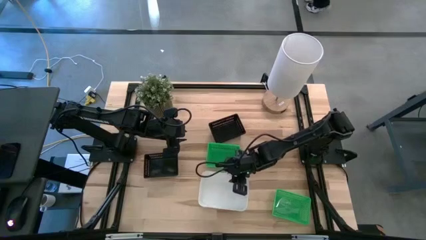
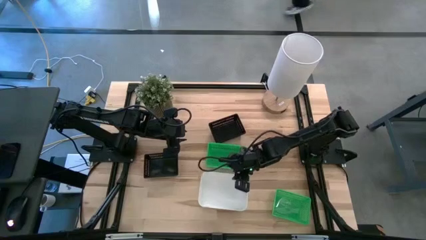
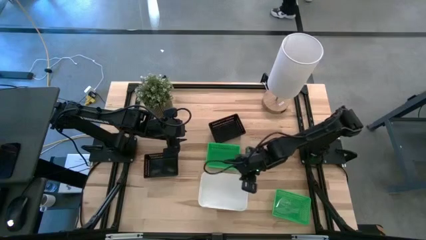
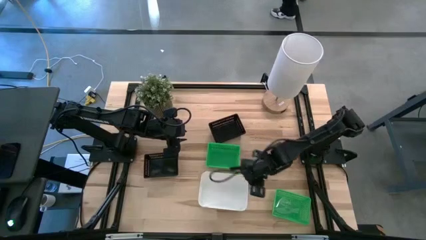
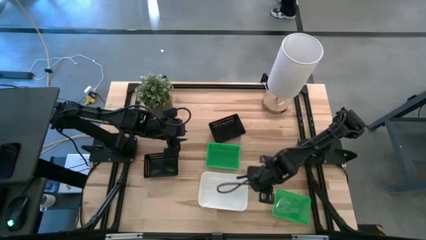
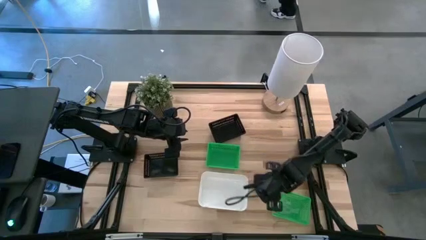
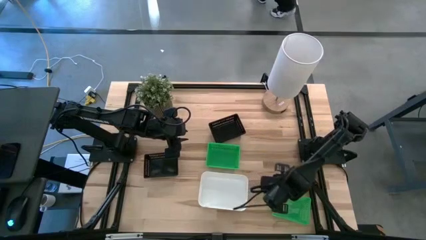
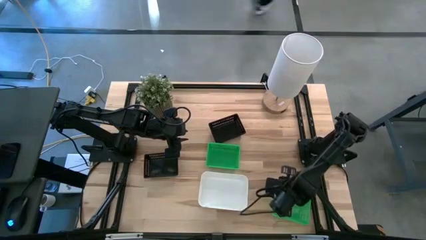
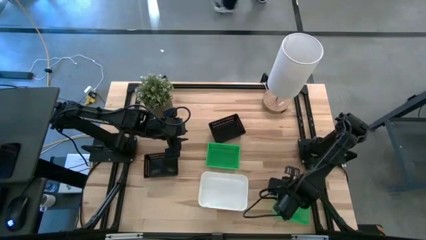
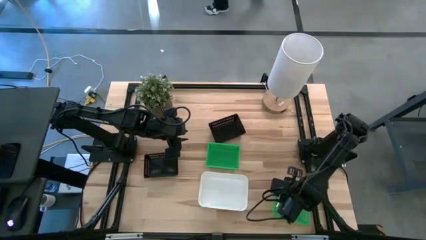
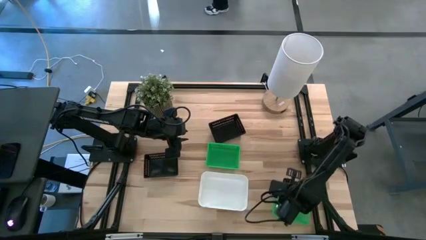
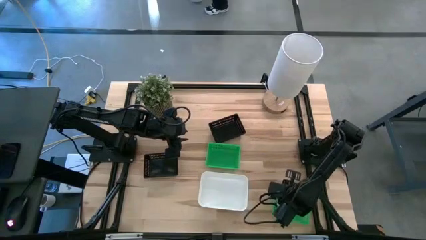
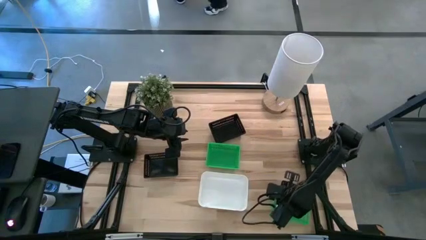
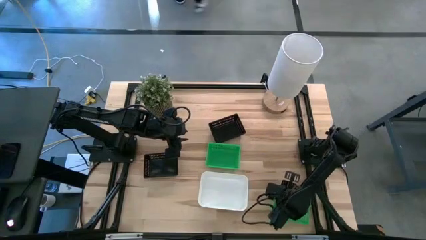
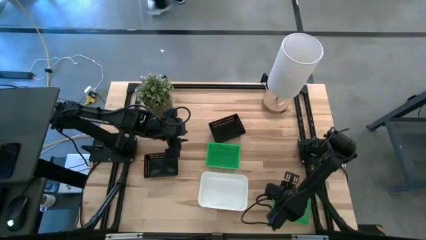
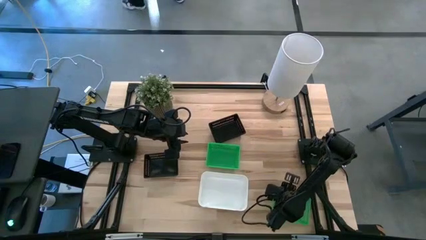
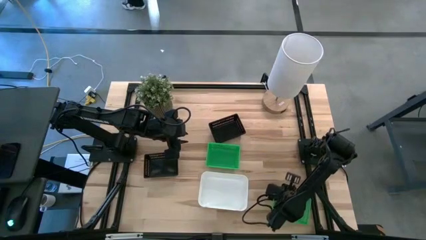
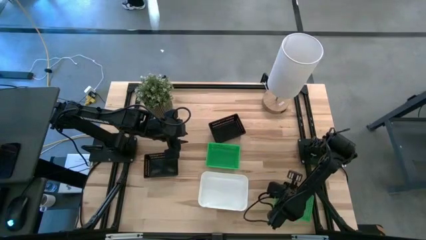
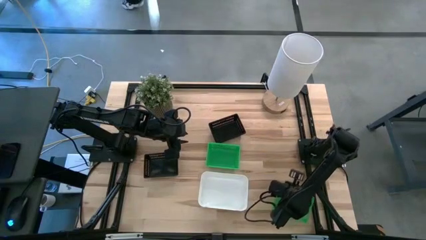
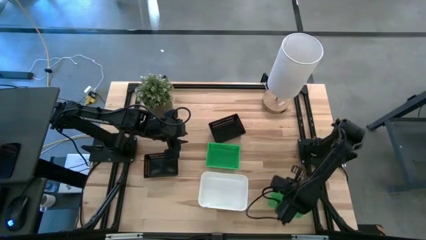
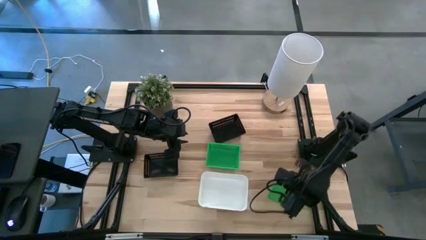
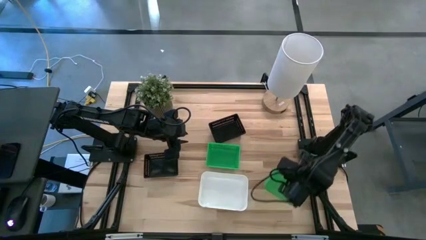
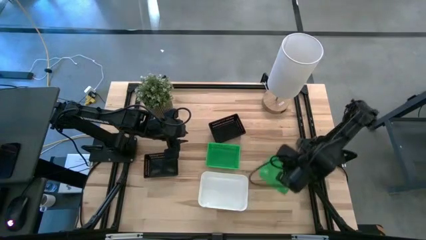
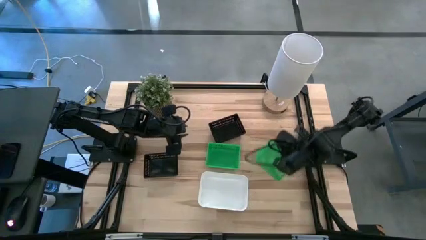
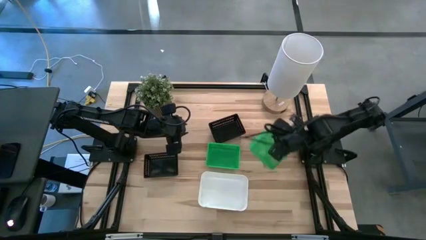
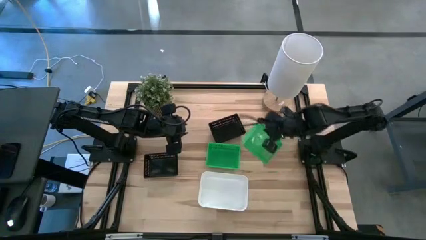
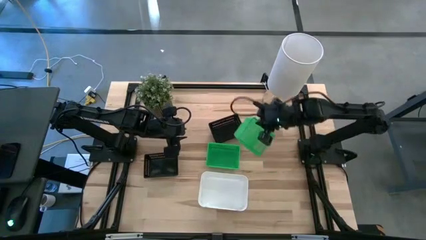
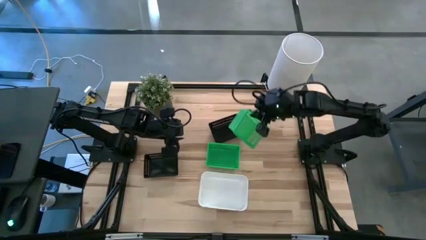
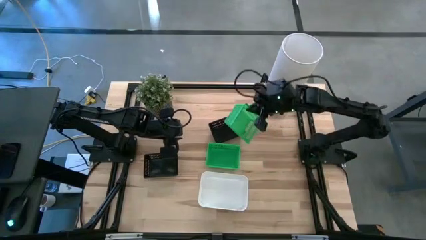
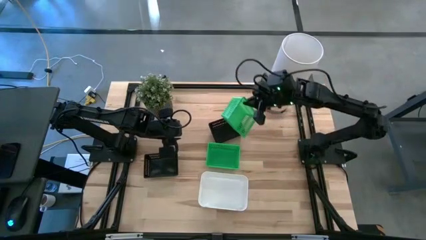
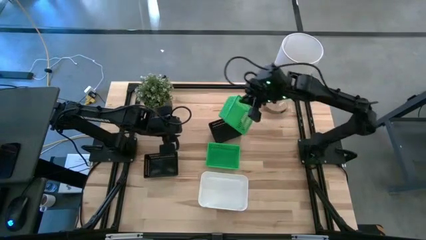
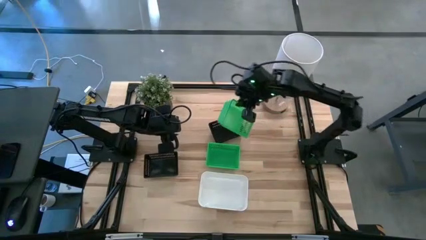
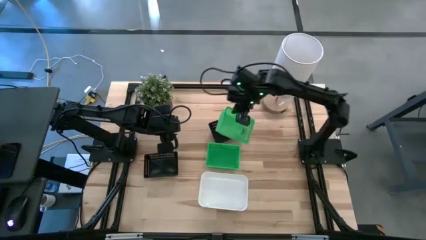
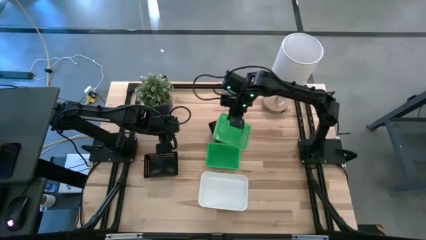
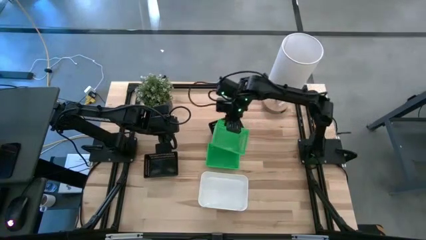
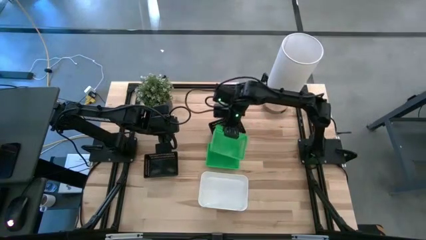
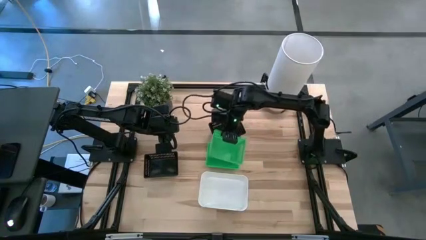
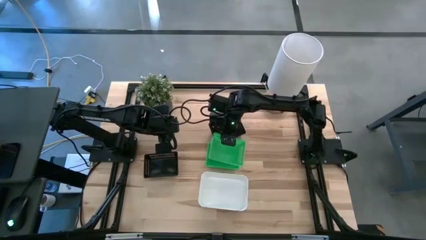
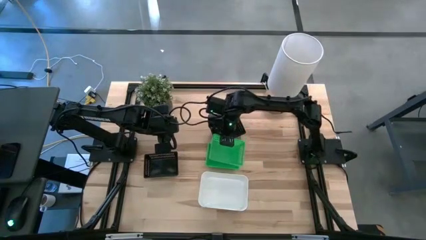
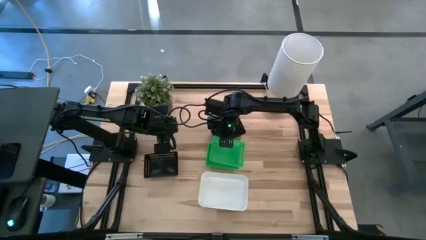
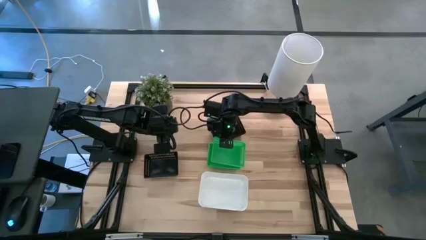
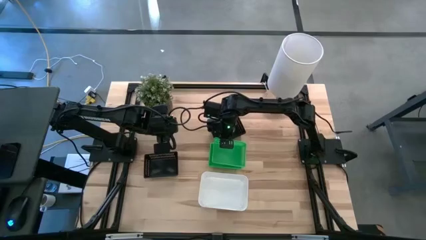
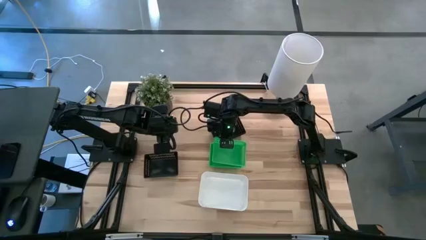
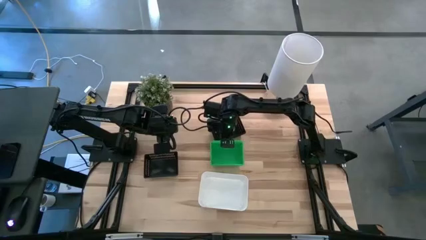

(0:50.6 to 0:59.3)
Stack the bottom green bin on the stacked green bin

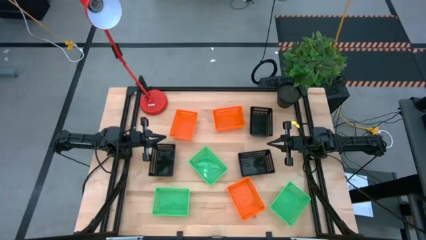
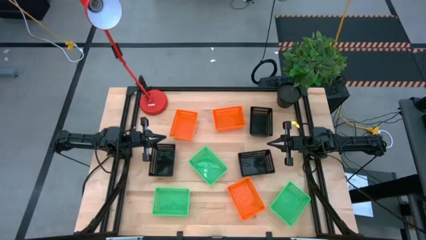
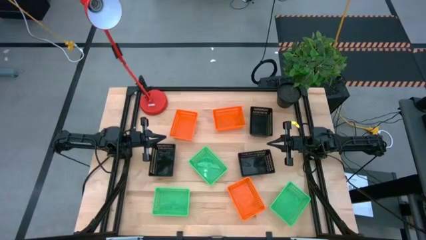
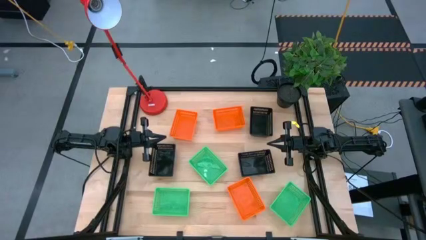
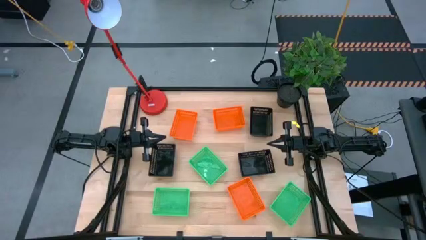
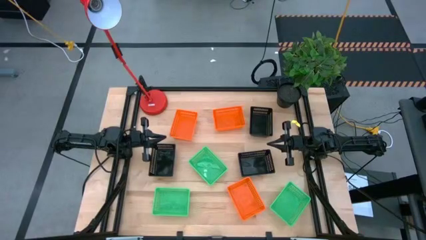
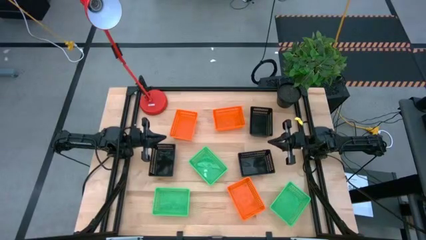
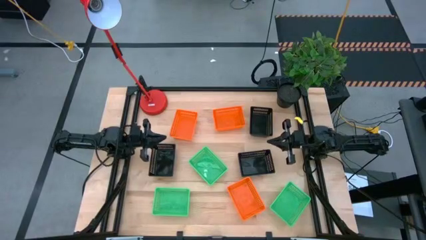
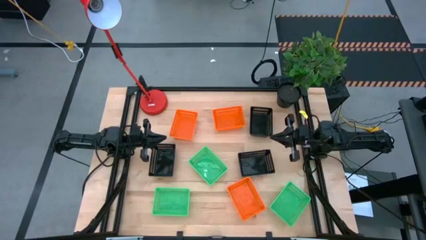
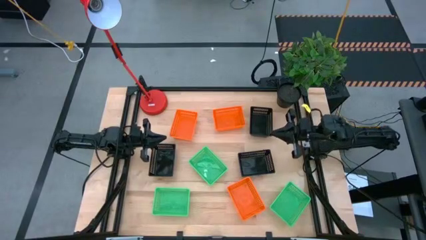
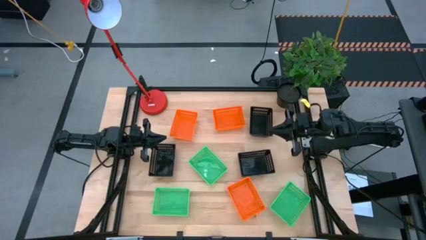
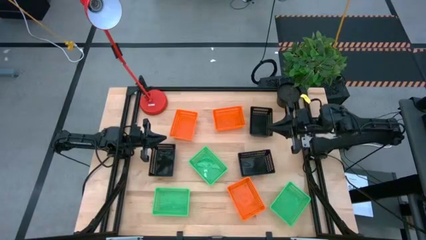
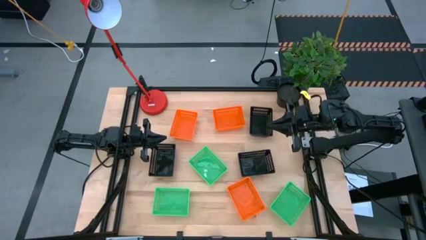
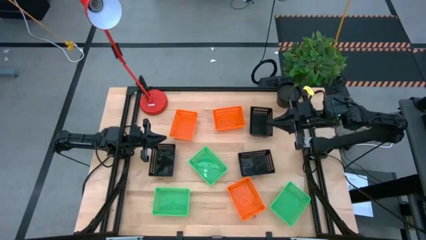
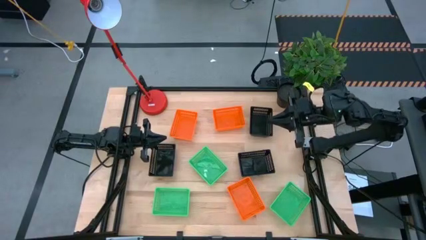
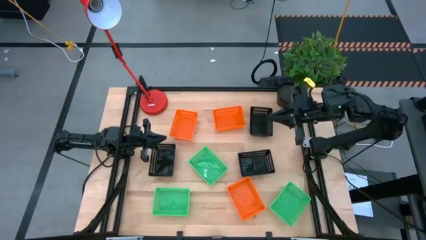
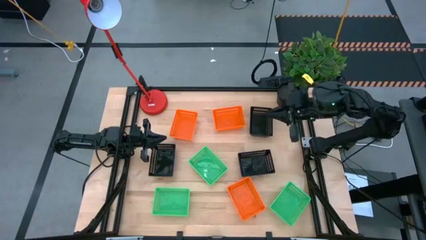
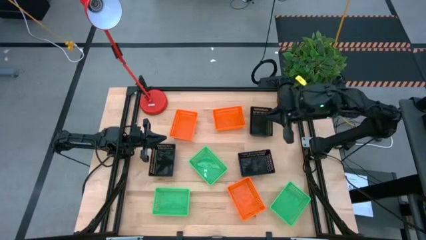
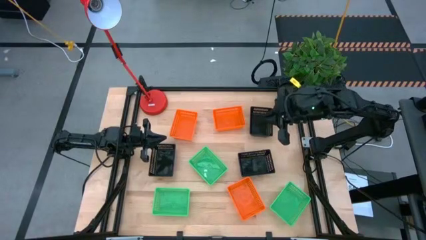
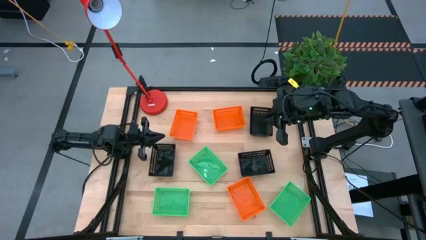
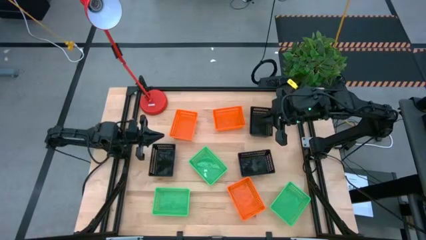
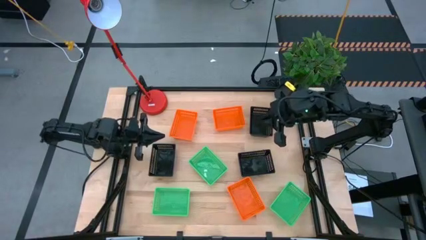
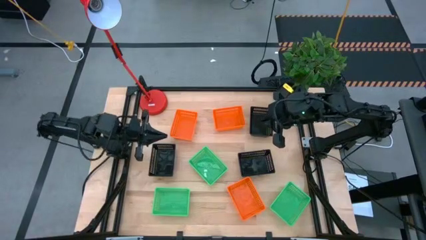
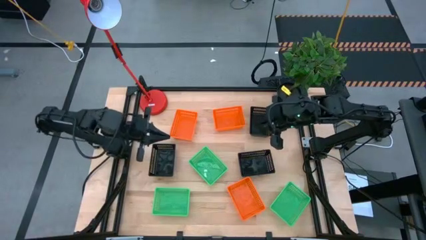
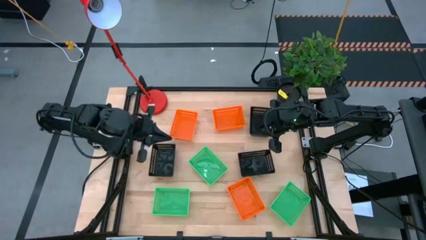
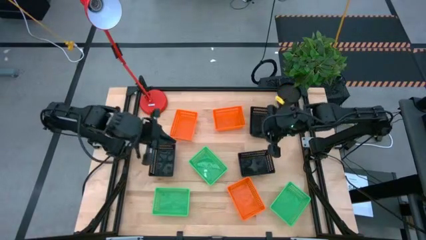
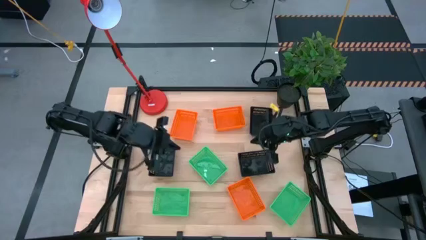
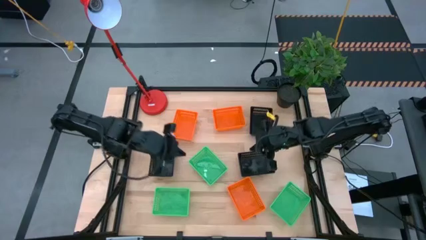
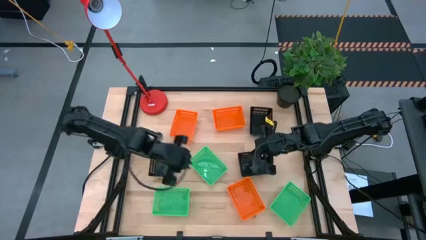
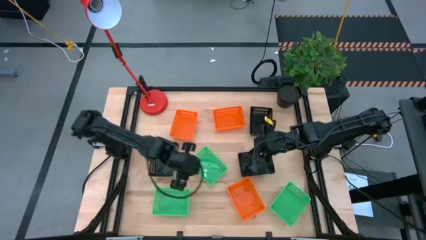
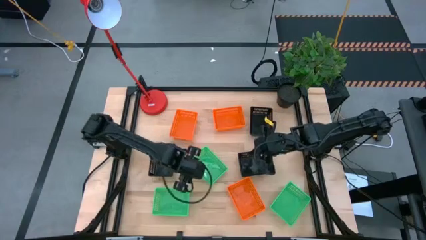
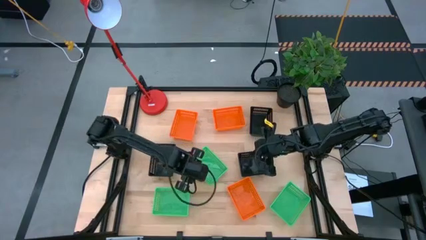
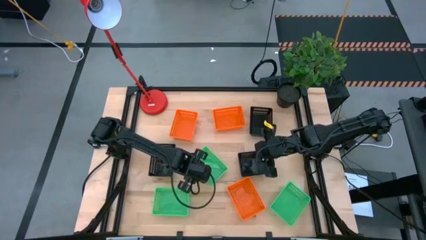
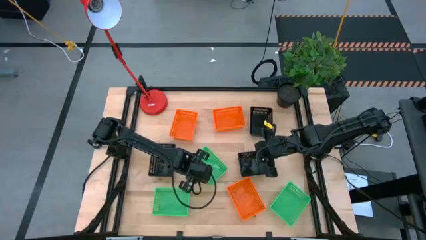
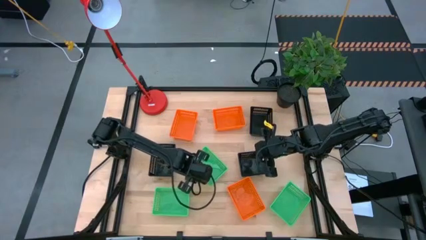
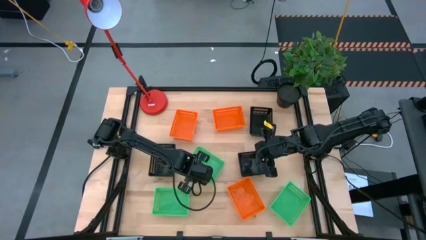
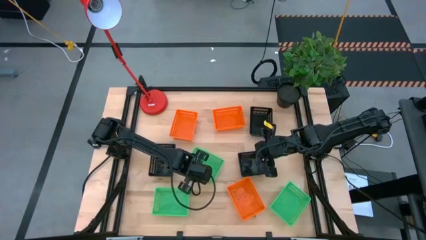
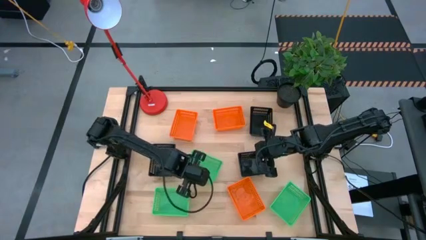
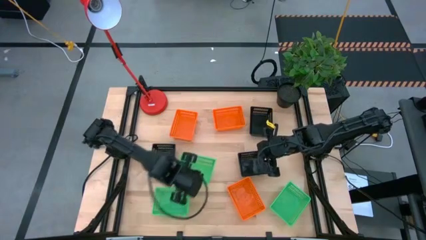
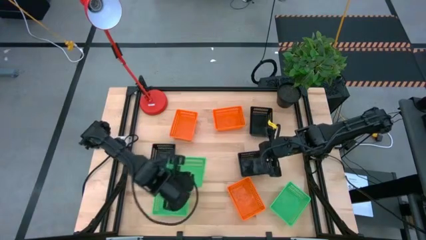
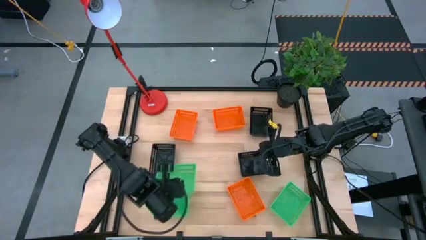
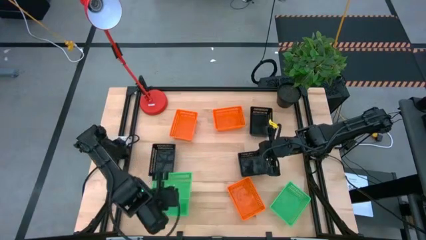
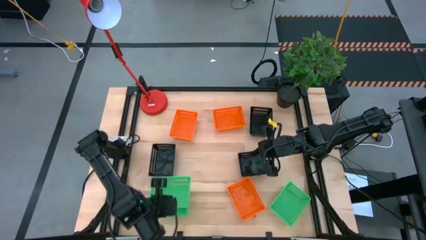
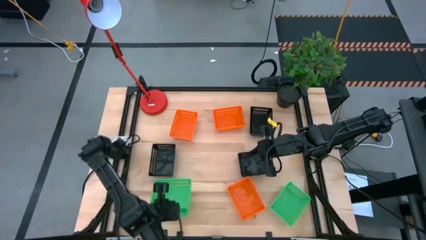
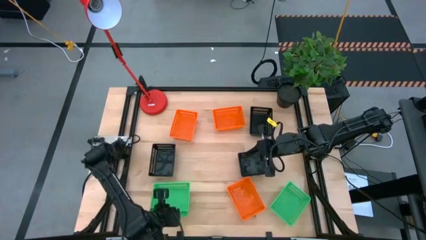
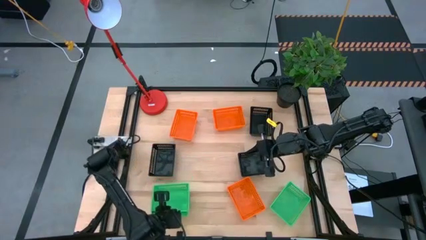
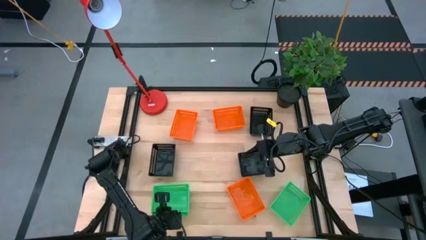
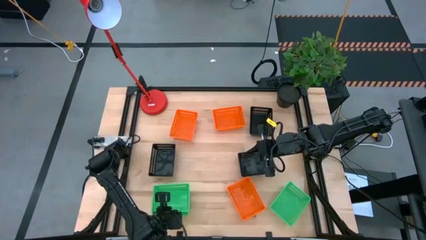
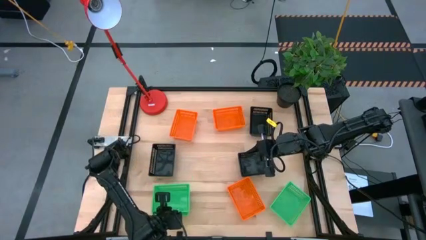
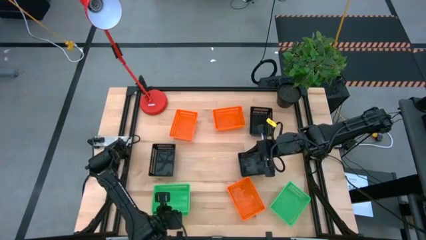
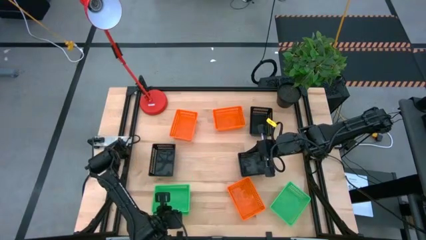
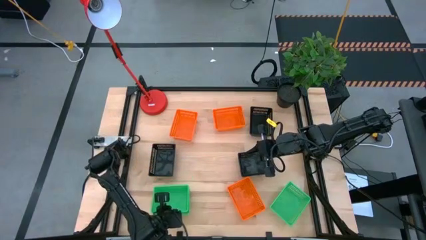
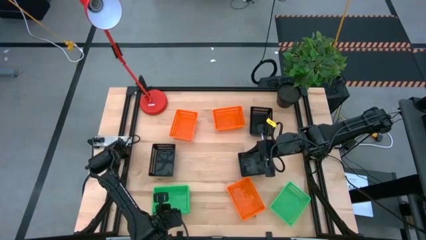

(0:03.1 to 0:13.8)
Stack the middle green basket on top of the left green basket
